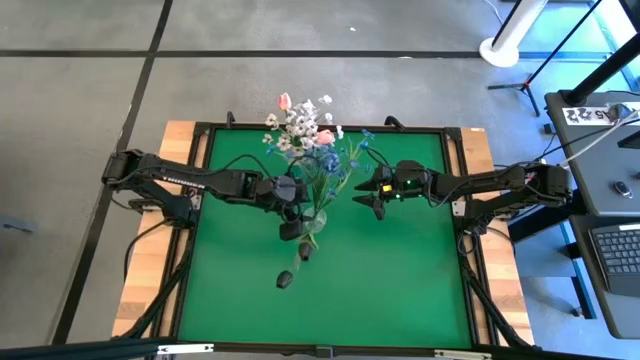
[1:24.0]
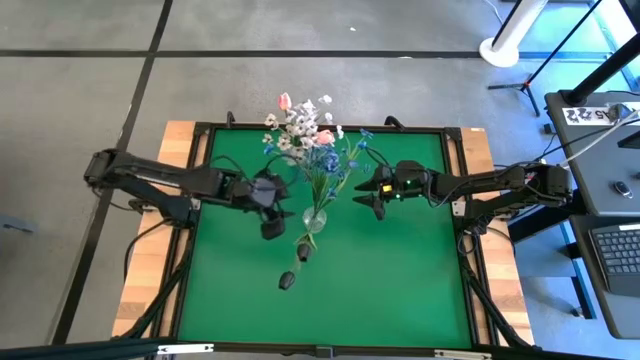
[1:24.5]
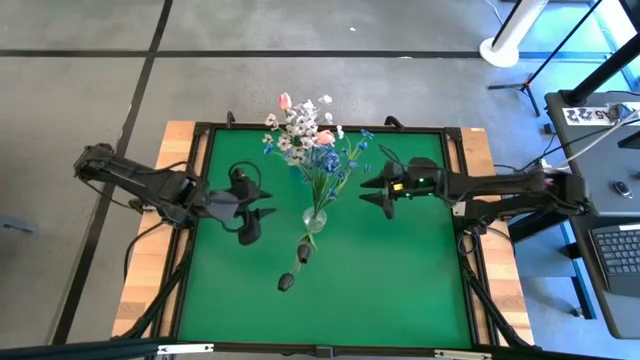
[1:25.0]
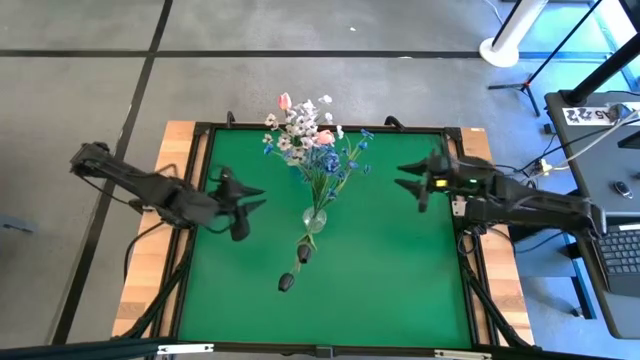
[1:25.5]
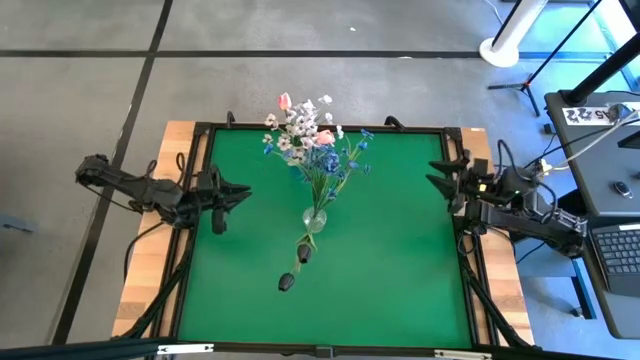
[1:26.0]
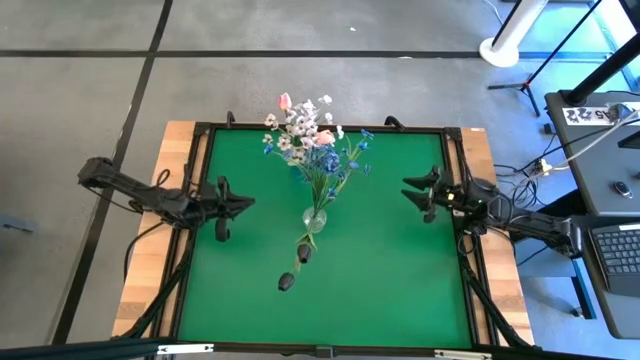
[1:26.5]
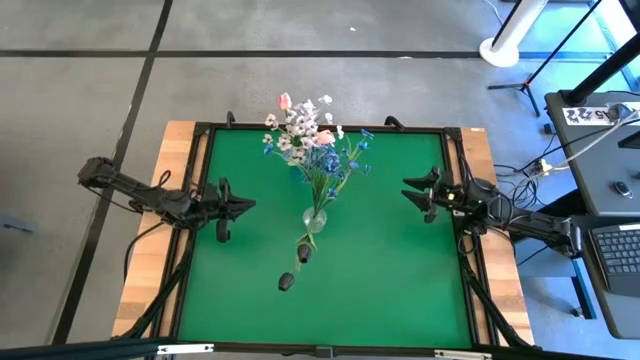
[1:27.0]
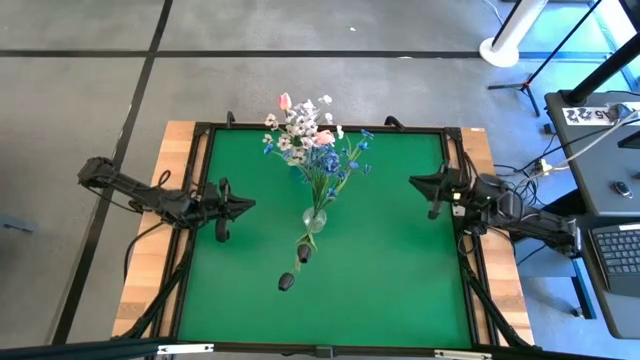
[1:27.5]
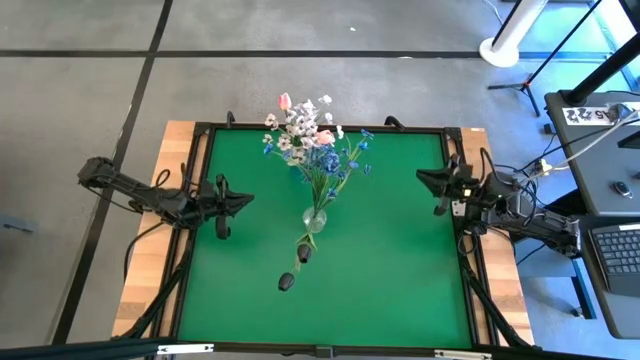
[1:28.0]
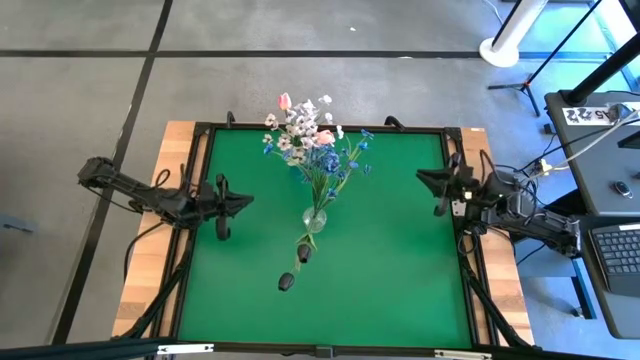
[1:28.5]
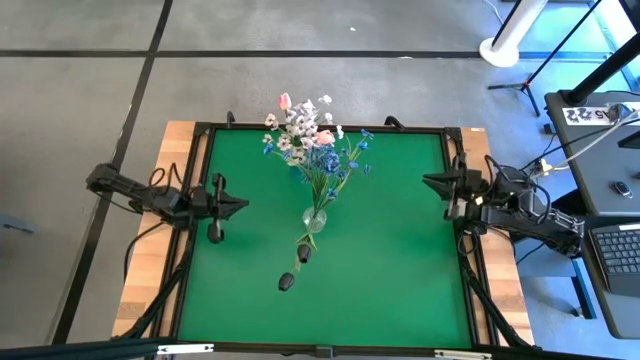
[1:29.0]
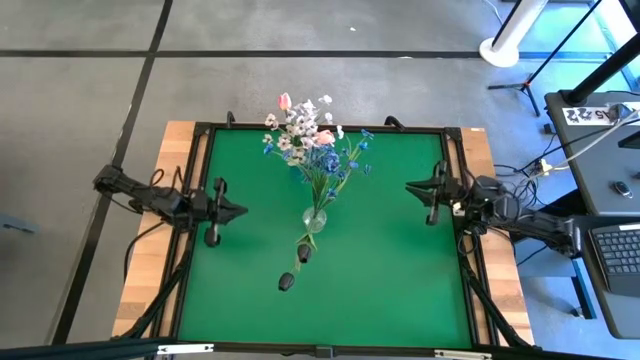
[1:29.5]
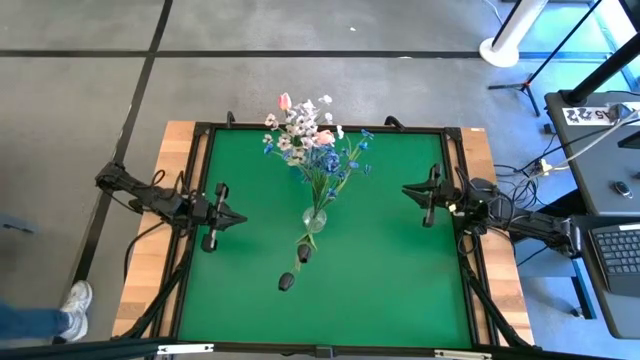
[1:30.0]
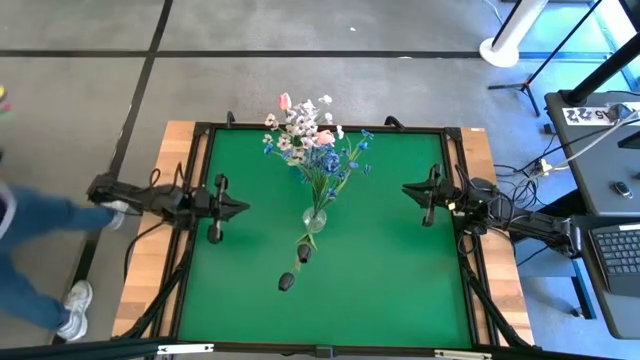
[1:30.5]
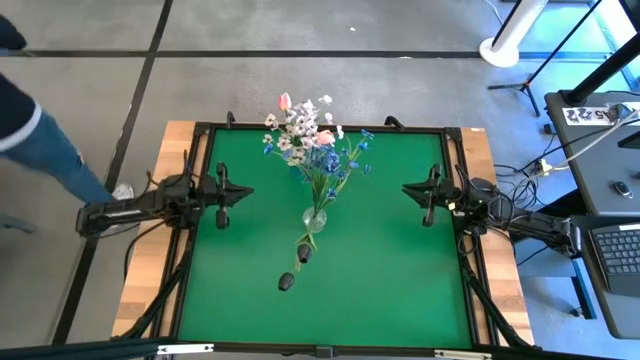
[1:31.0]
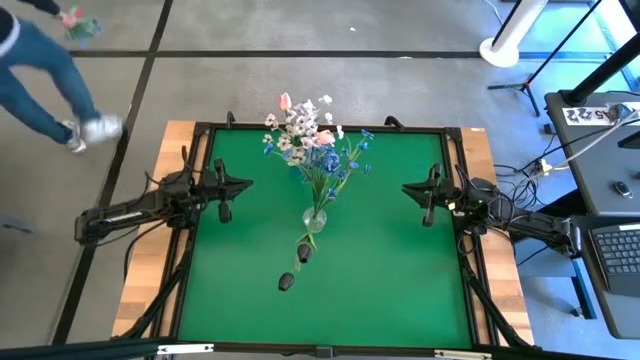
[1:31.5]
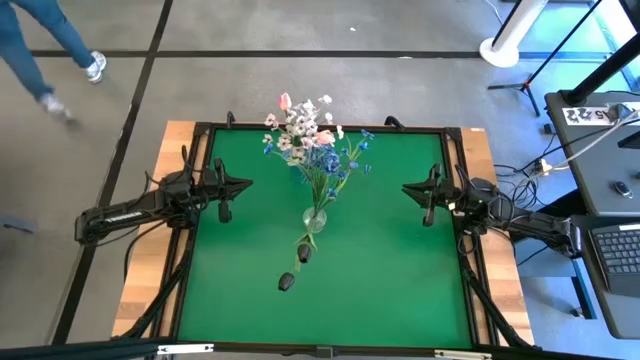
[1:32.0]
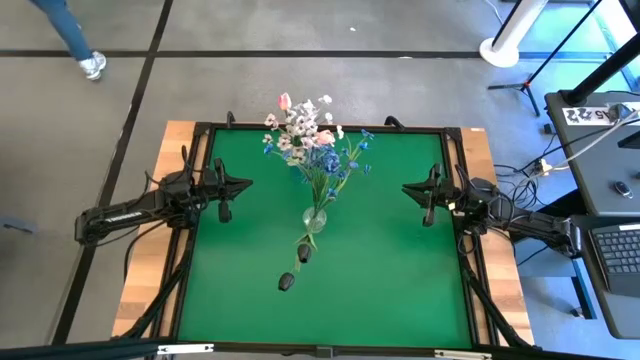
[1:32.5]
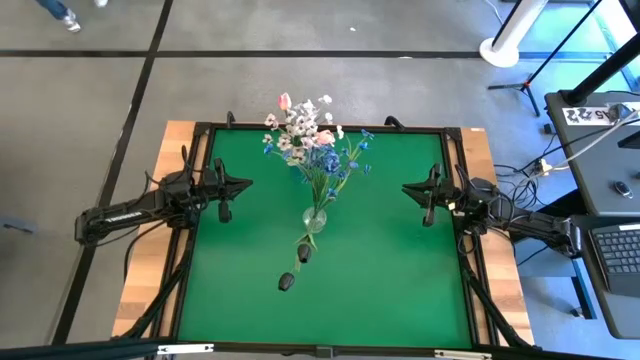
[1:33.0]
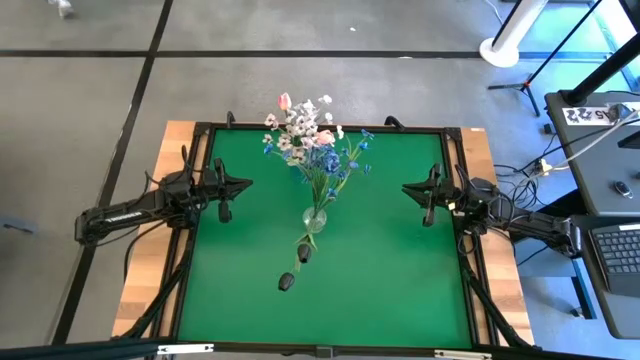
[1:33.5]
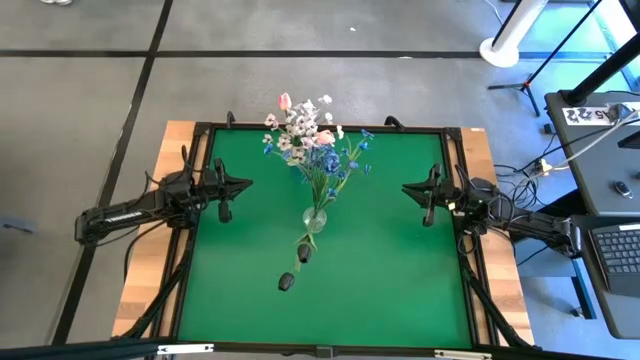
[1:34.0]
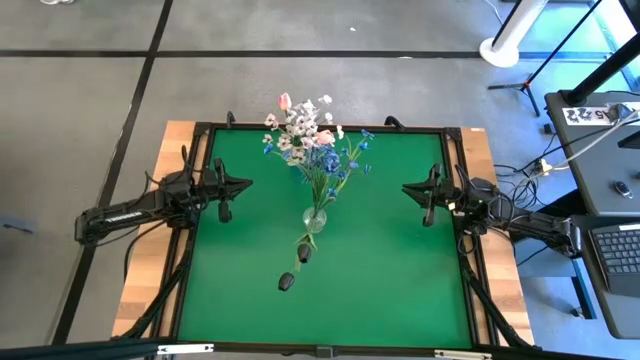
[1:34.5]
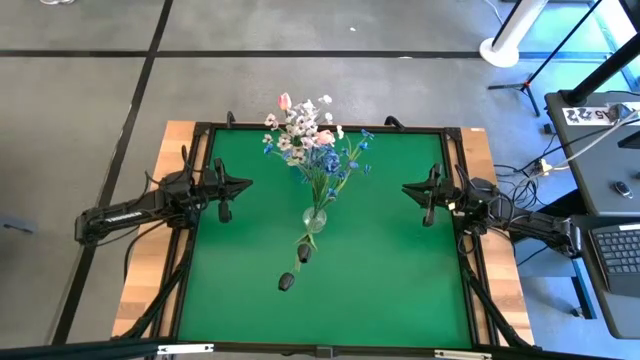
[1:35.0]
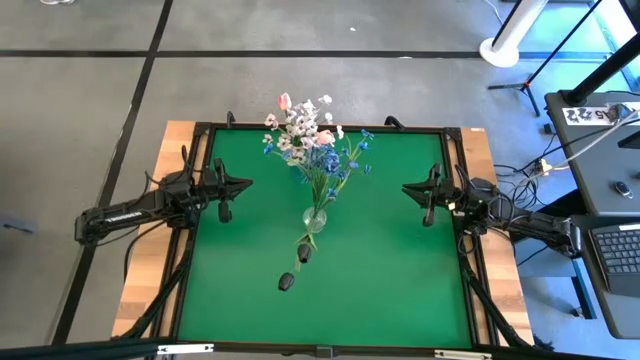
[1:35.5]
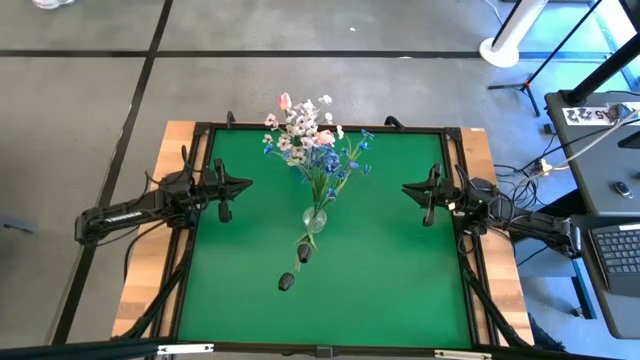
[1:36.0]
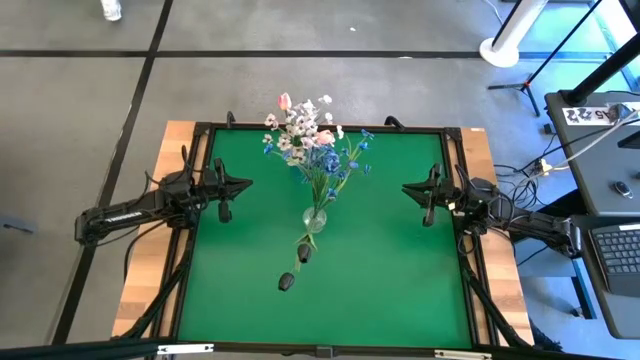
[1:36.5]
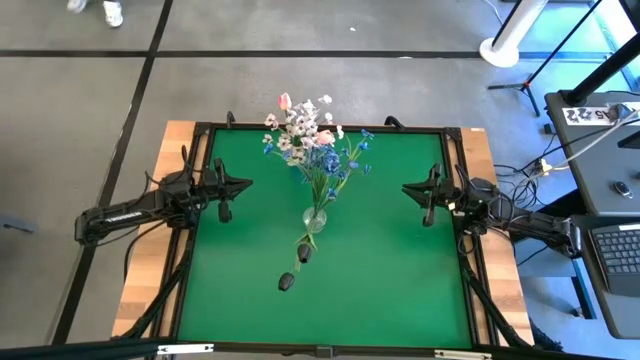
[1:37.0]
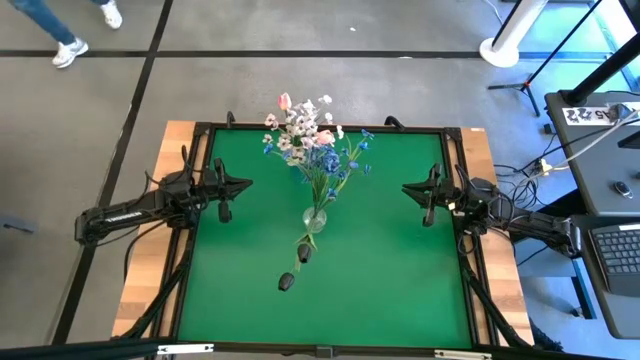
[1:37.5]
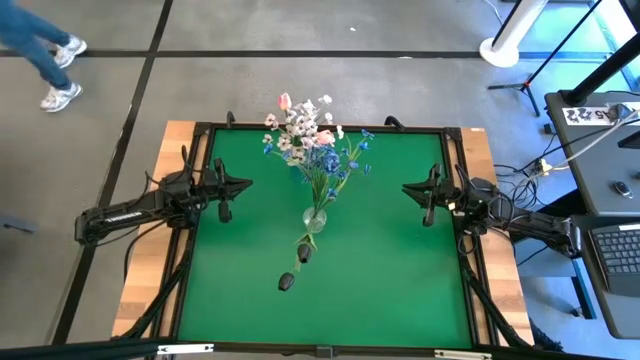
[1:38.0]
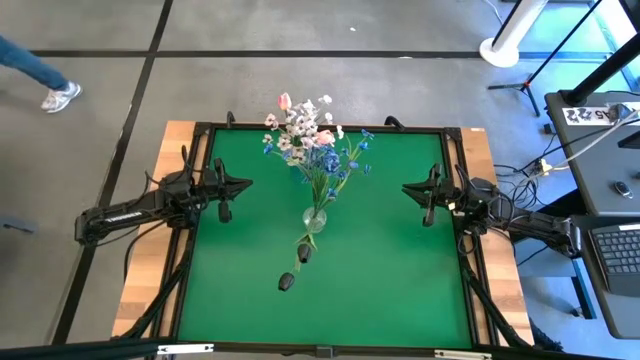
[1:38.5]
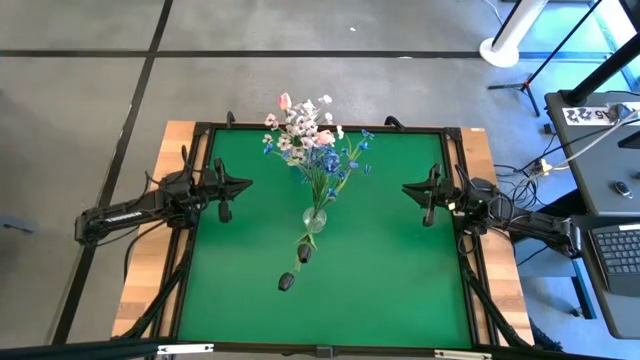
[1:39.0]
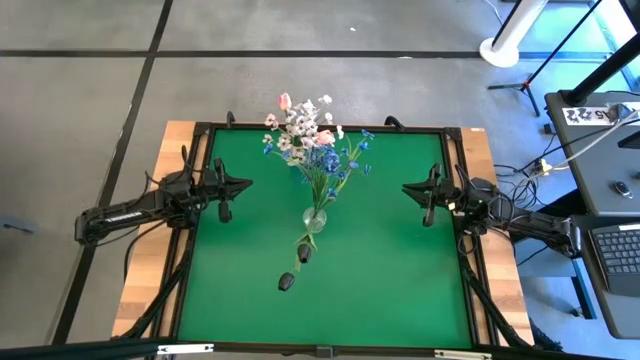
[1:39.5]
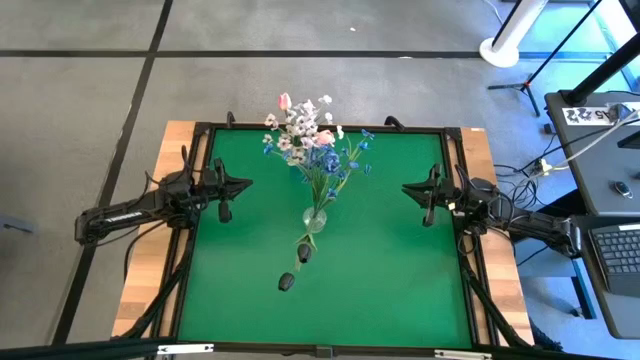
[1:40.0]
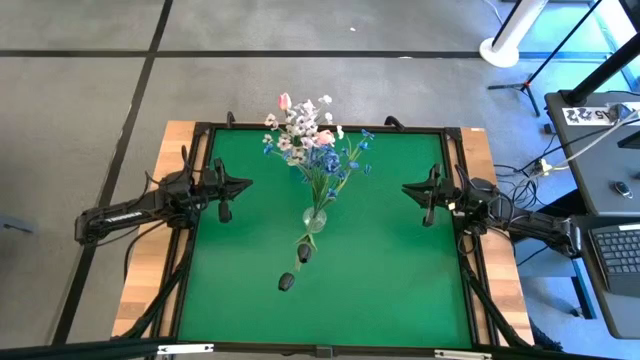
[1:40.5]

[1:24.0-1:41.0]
Task: Sort flowers into vase by color
Return to Home Position
